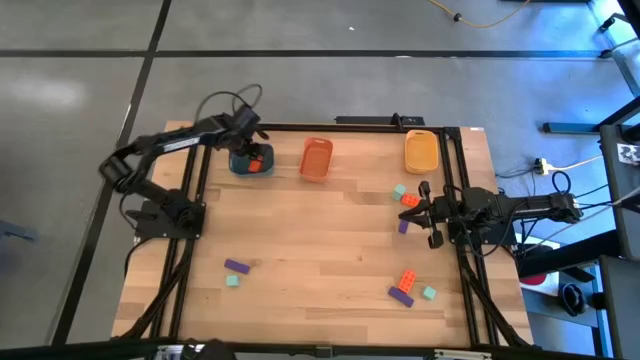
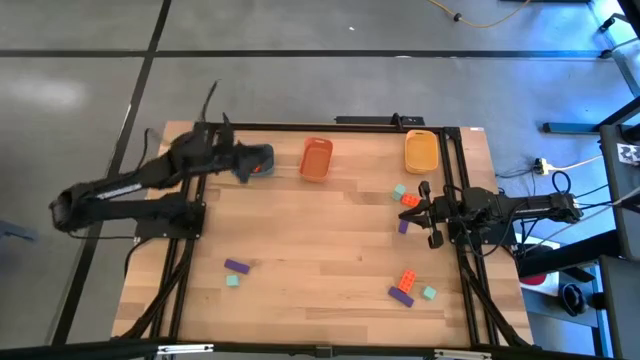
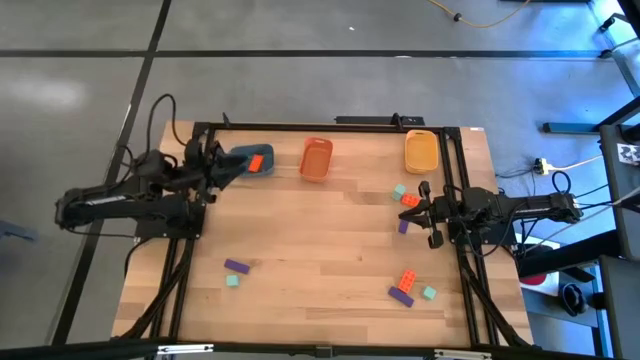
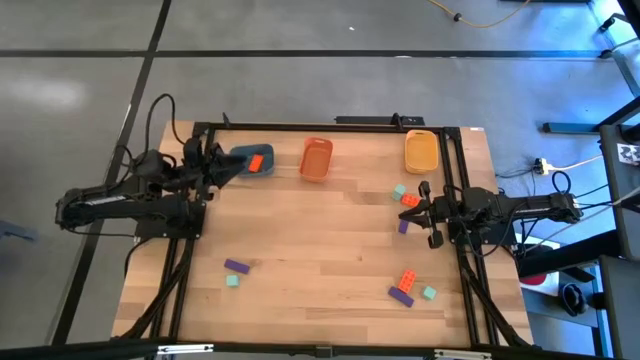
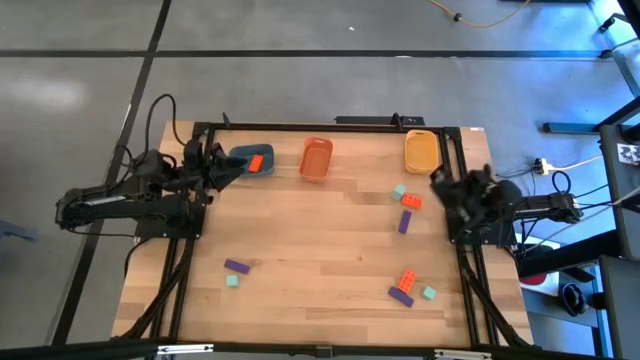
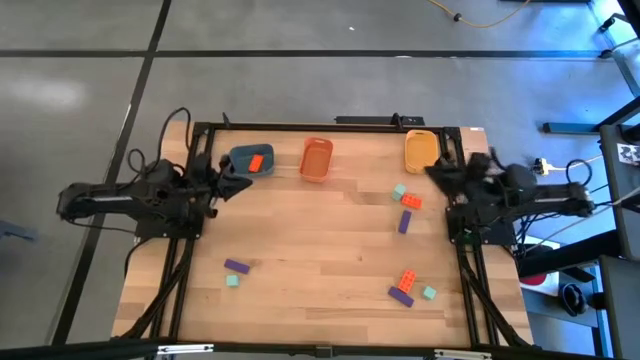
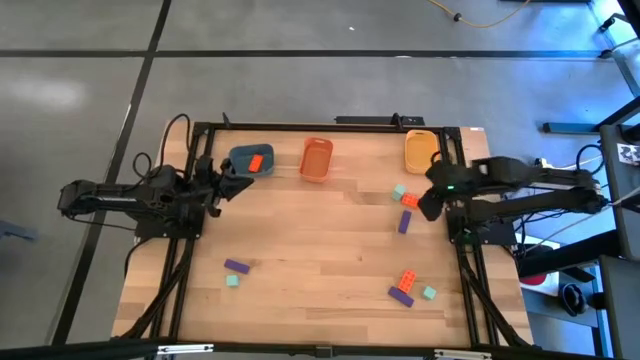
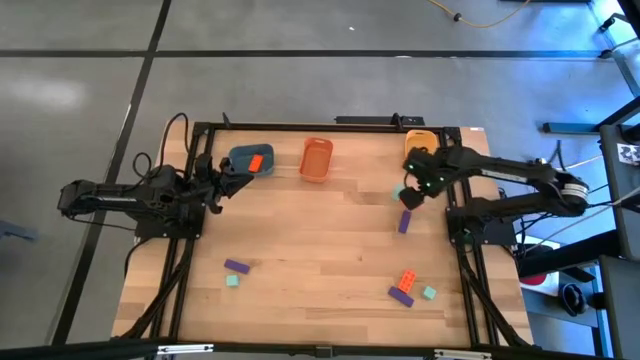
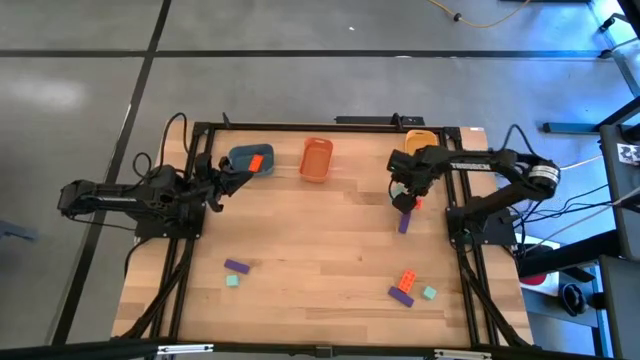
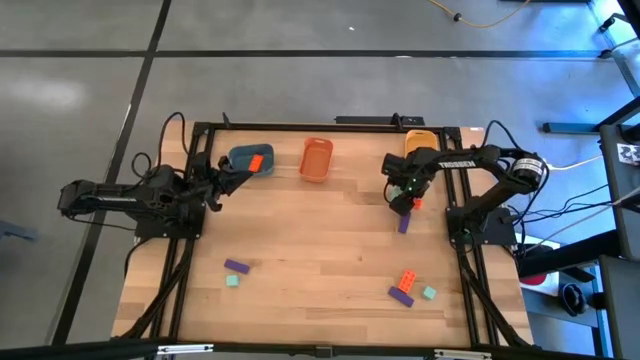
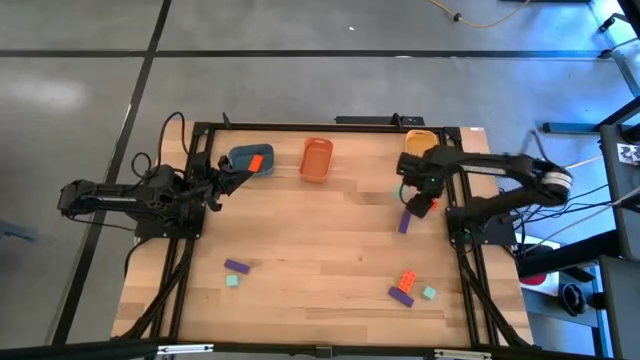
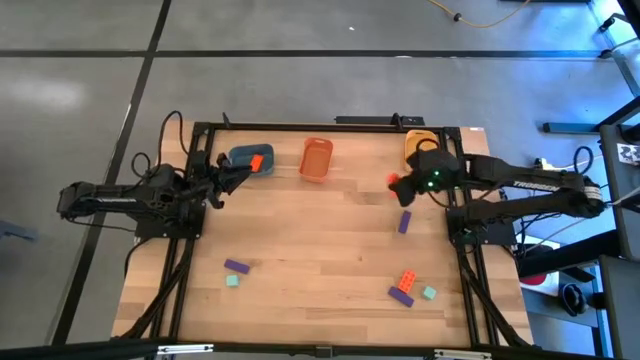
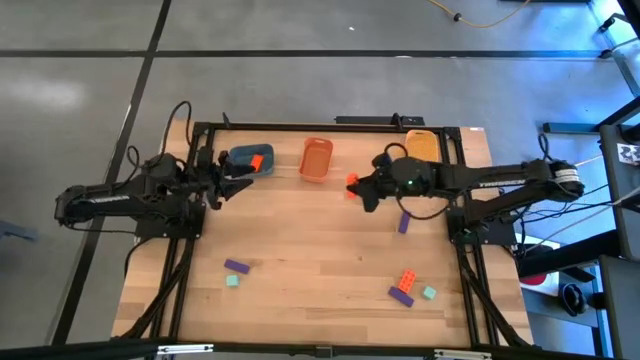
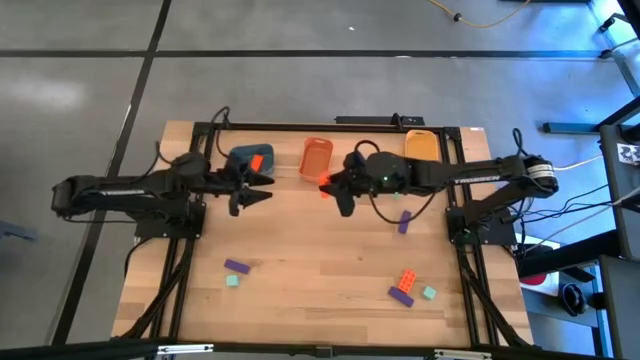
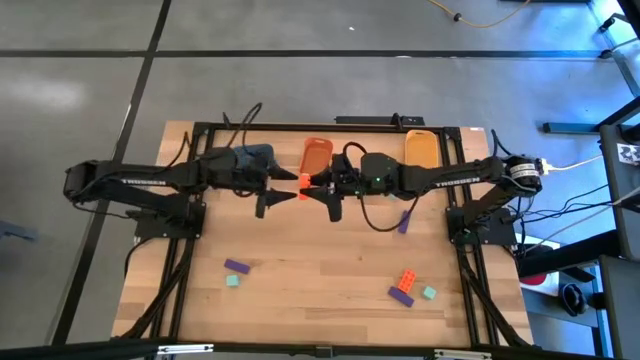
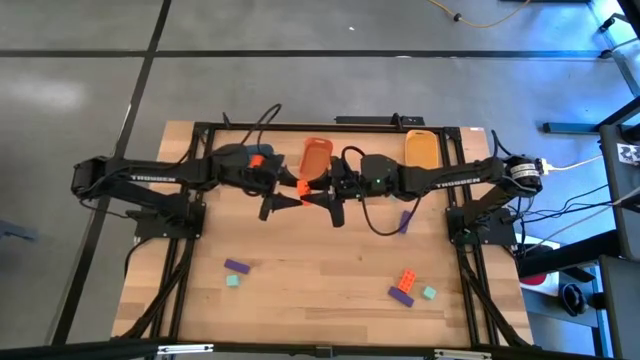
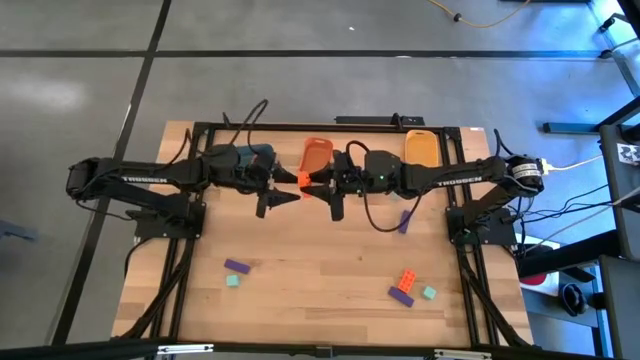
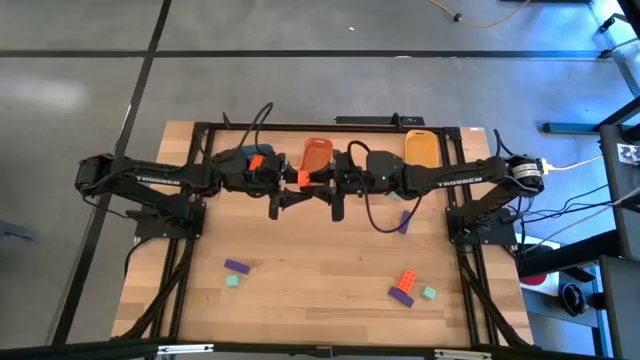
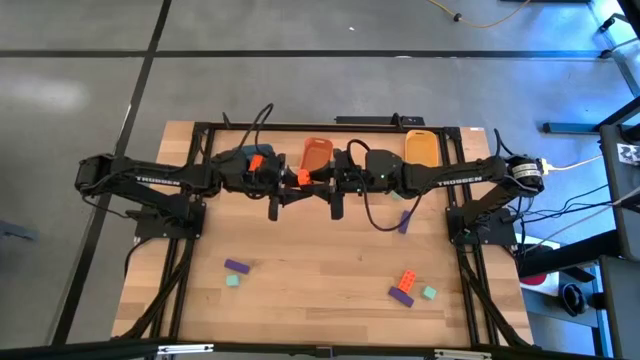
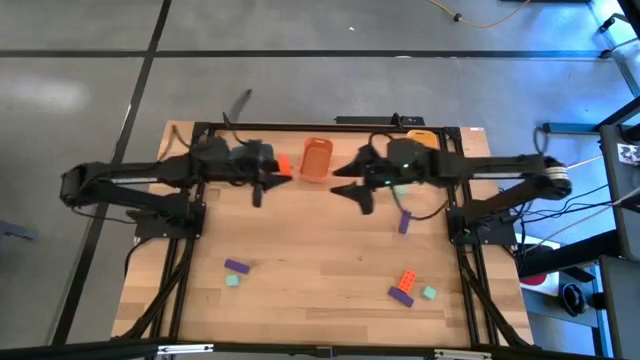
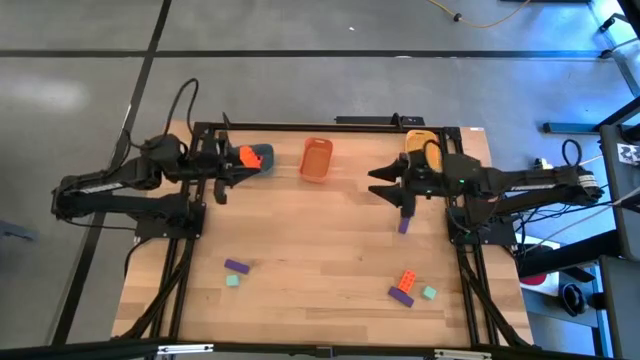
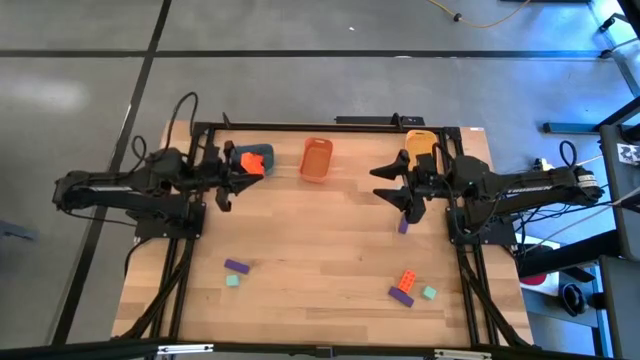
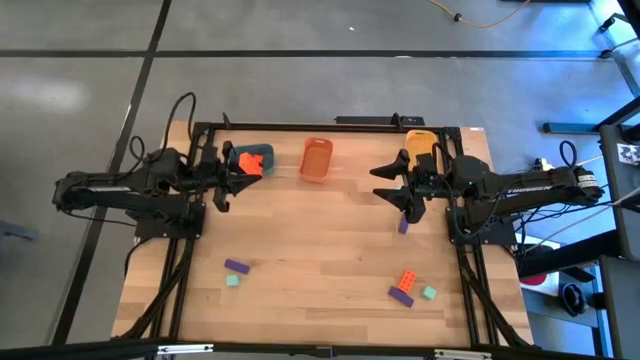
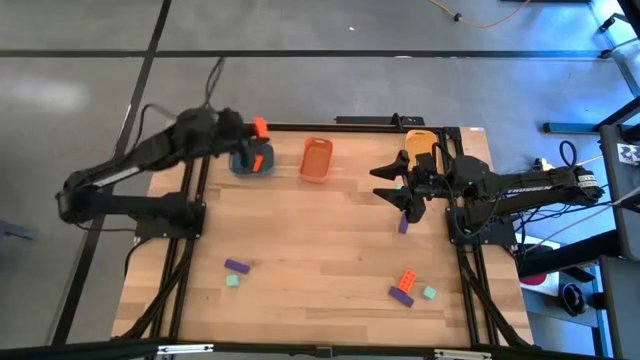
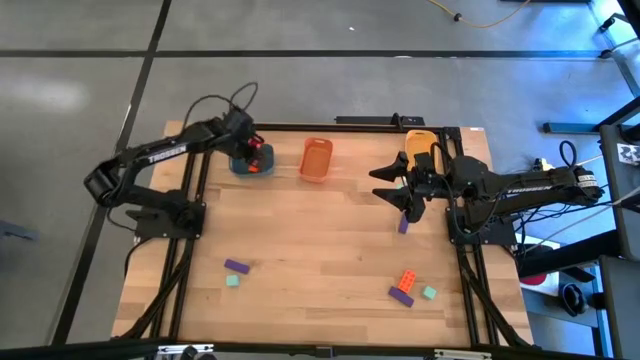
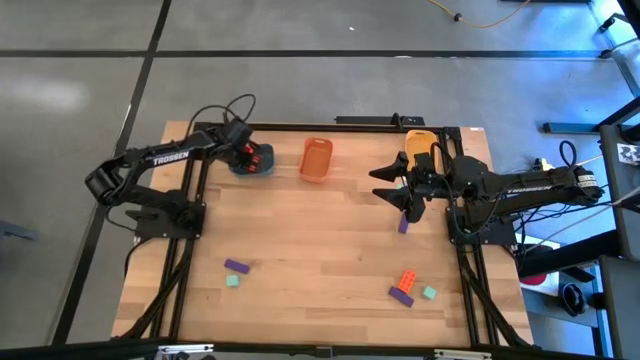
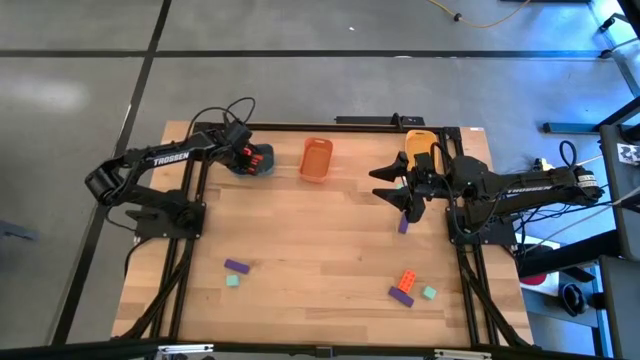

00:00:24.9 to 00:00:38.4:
Task: Sort & place blocks by color
Put the top orange gamepiece into the blue bin

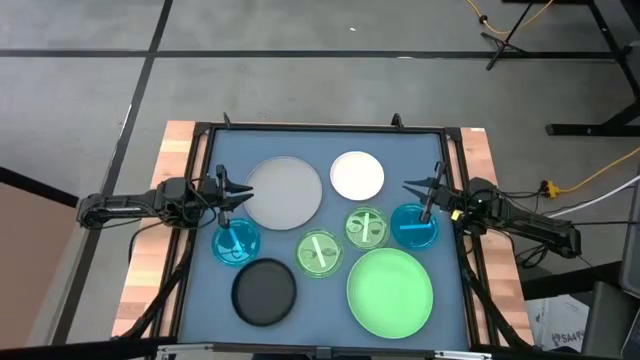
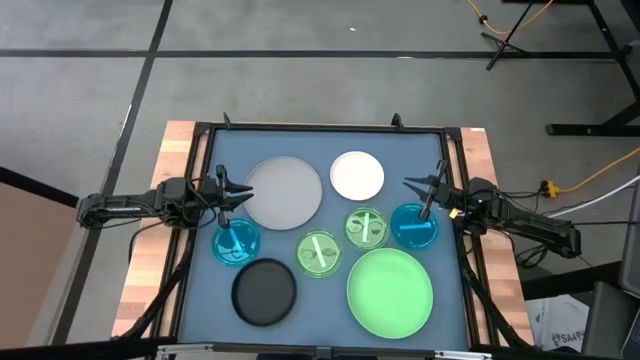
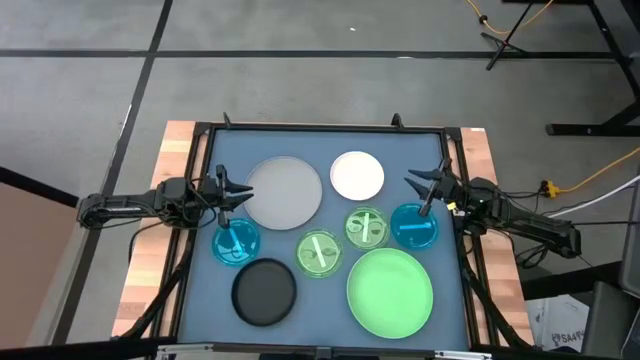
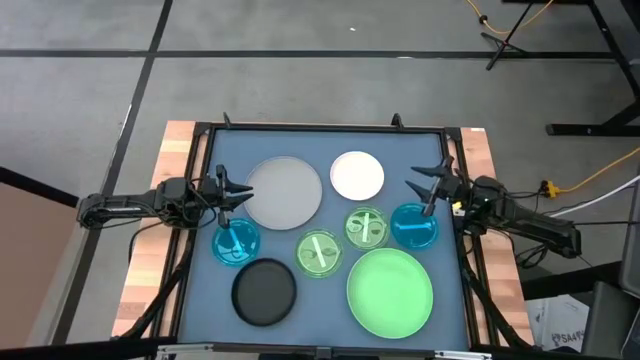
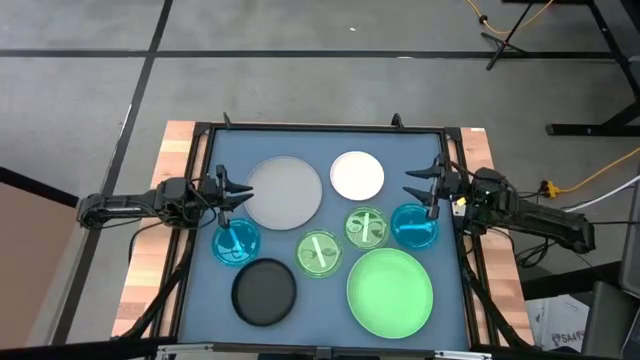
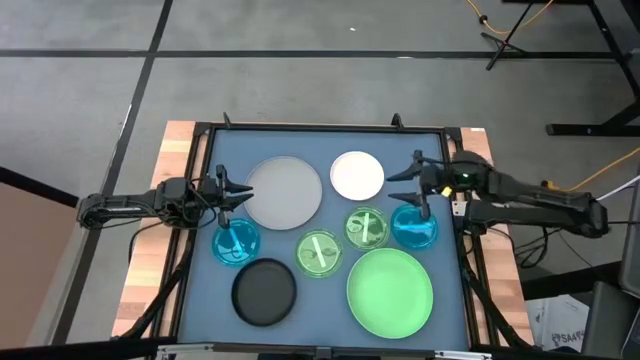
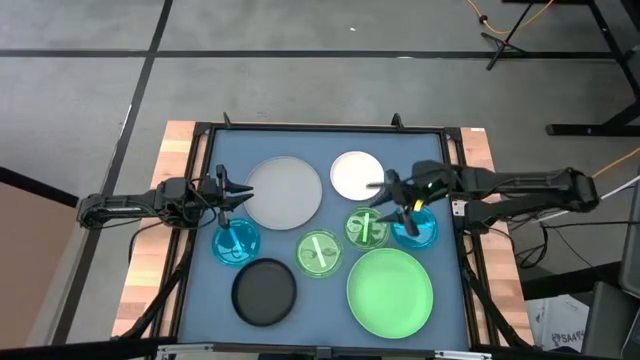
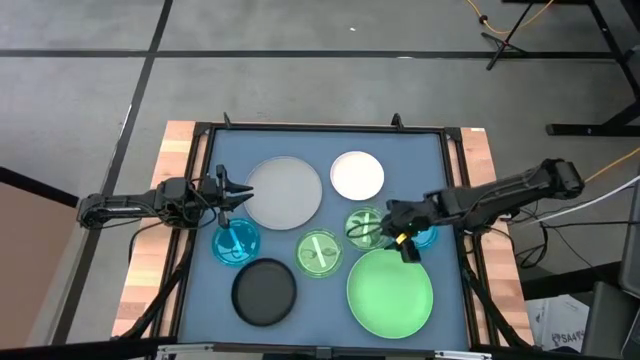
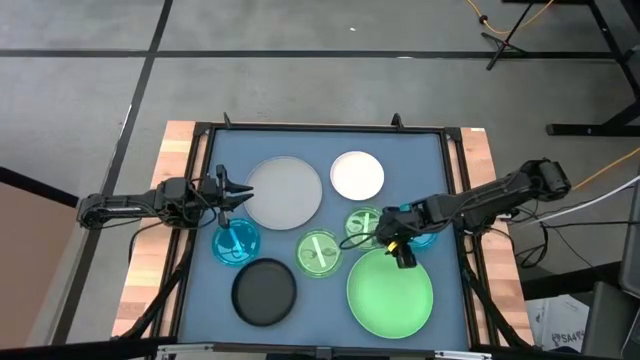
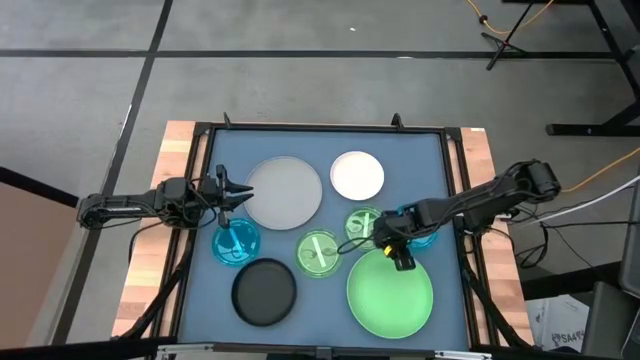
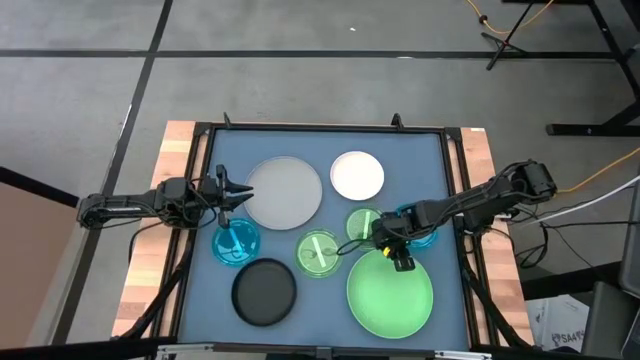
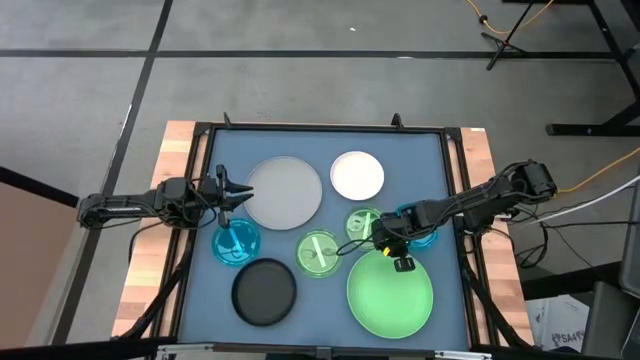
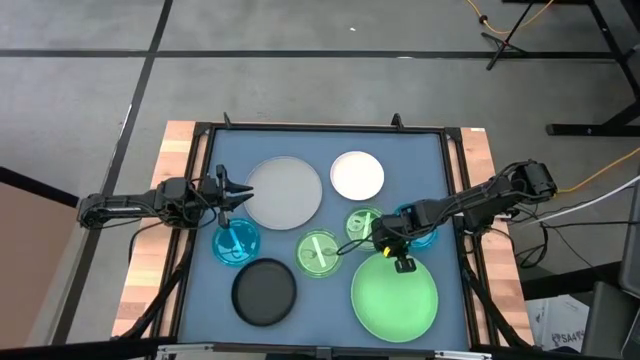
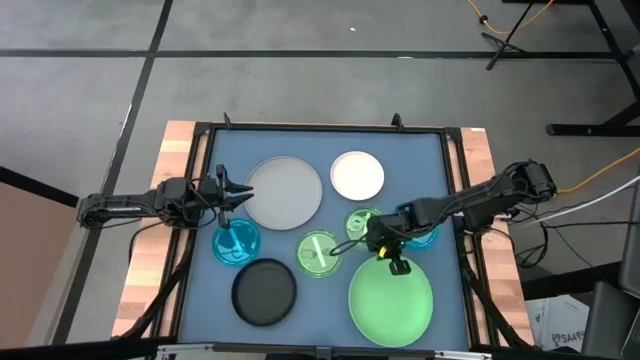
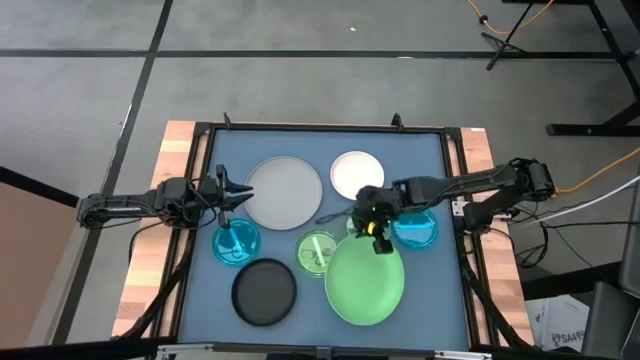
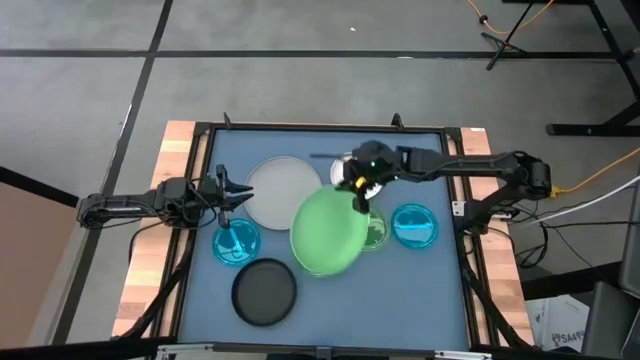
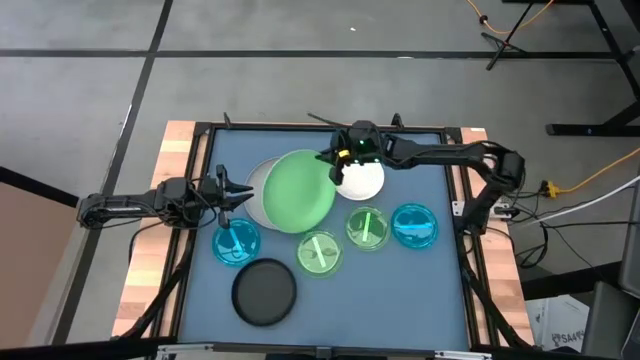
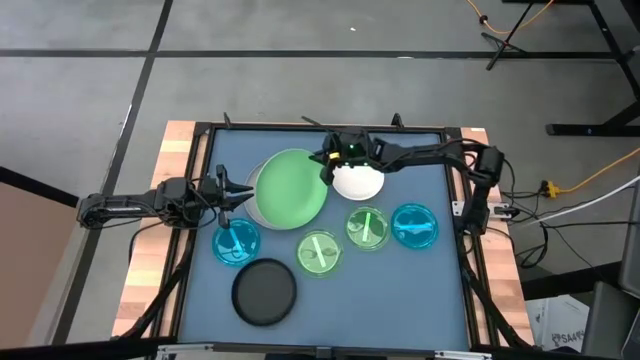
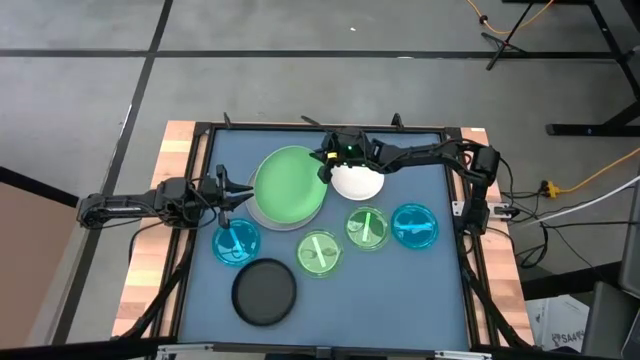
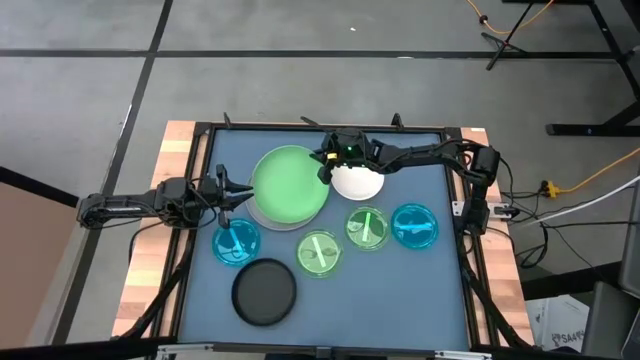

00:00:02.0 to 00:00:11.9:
Task: Stack plastic plates
Stack the green plate on top of the gray plate
